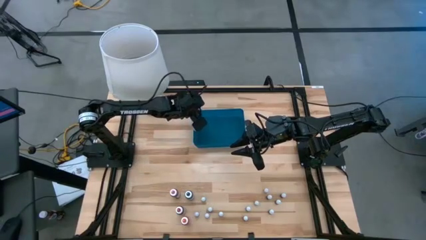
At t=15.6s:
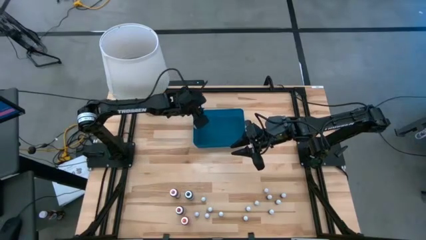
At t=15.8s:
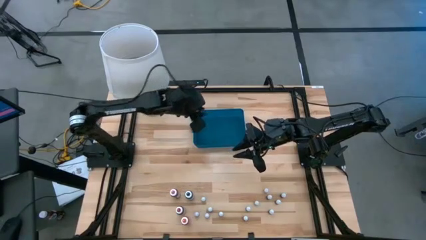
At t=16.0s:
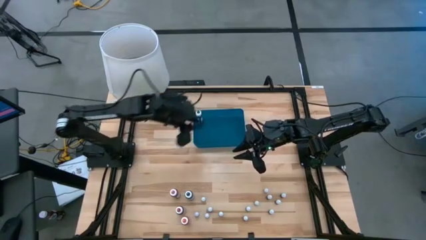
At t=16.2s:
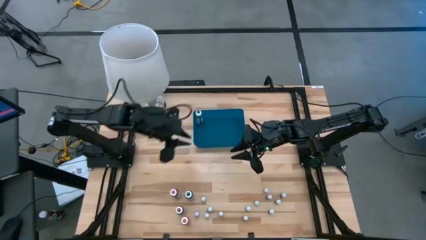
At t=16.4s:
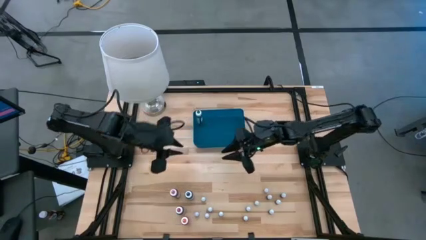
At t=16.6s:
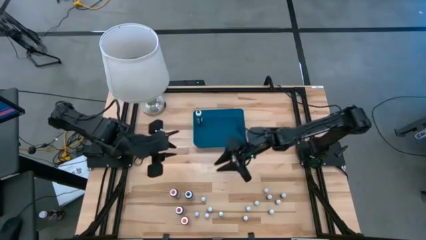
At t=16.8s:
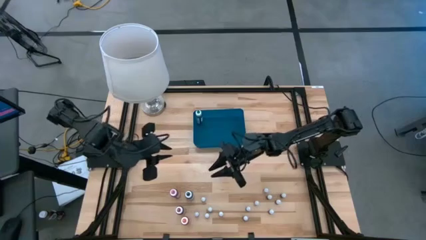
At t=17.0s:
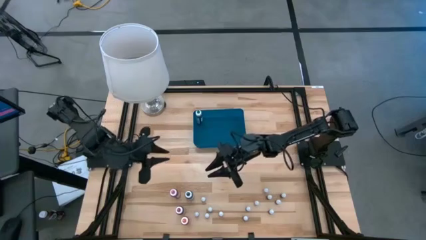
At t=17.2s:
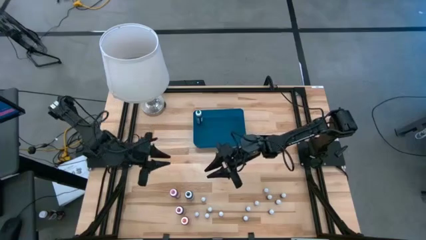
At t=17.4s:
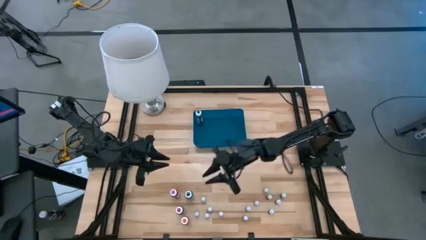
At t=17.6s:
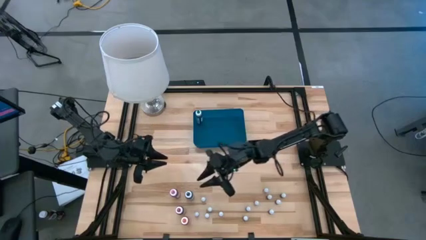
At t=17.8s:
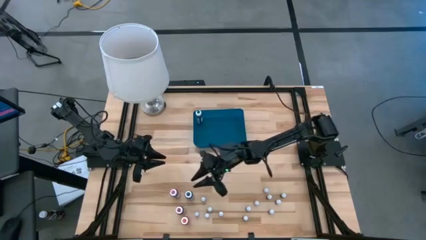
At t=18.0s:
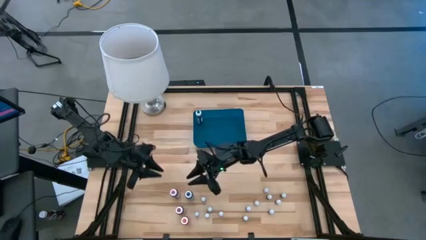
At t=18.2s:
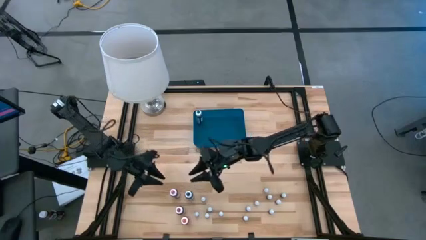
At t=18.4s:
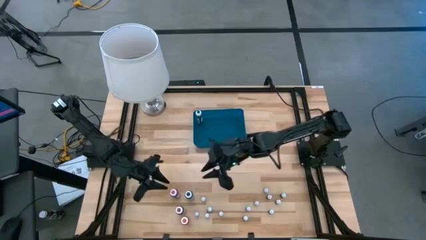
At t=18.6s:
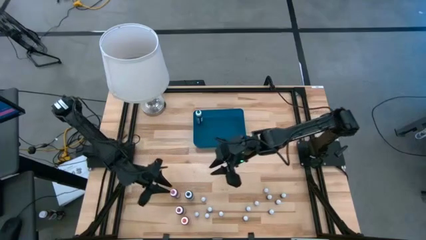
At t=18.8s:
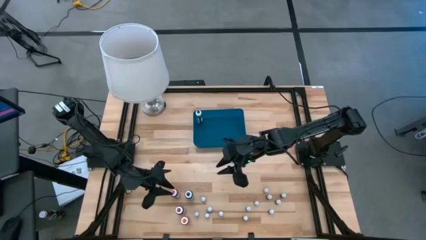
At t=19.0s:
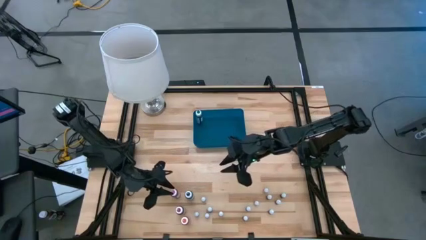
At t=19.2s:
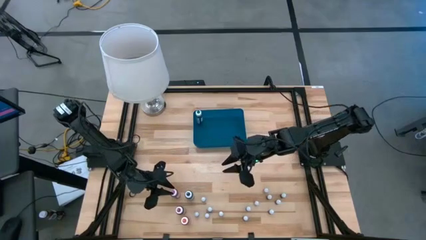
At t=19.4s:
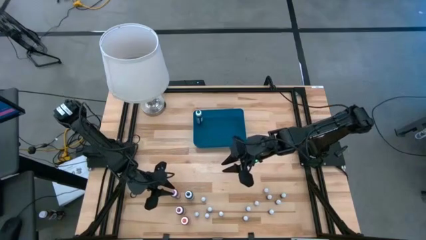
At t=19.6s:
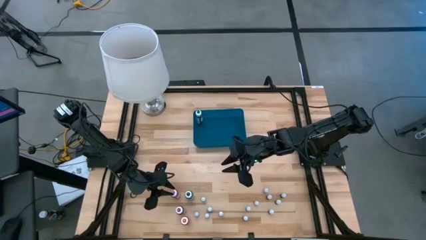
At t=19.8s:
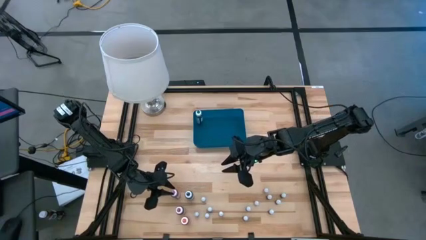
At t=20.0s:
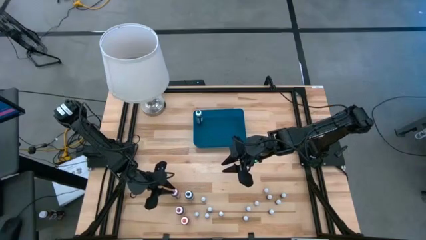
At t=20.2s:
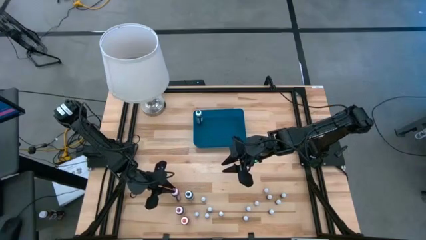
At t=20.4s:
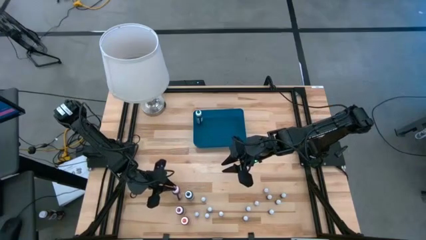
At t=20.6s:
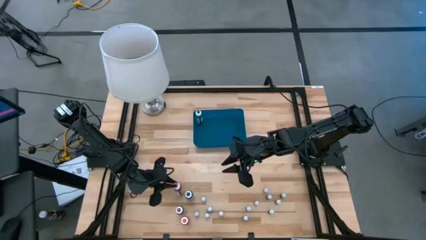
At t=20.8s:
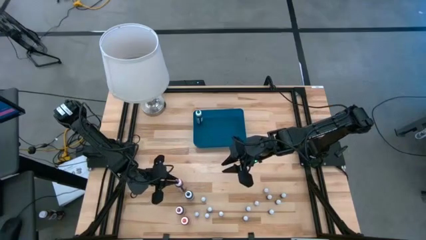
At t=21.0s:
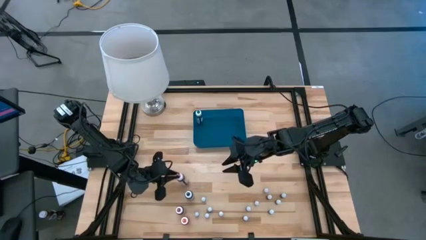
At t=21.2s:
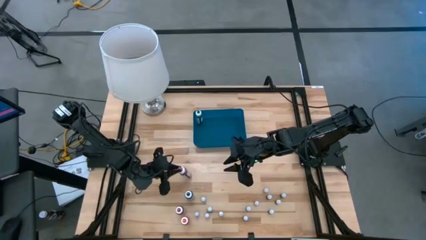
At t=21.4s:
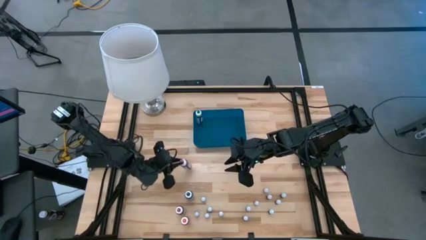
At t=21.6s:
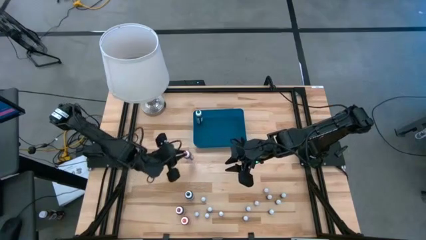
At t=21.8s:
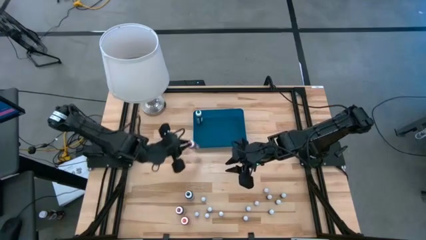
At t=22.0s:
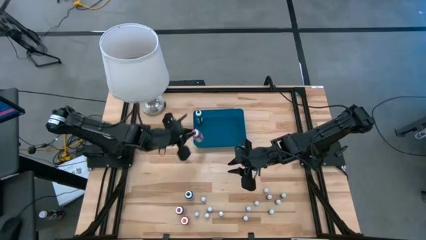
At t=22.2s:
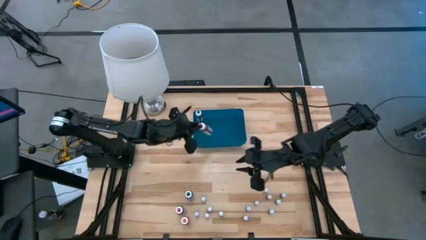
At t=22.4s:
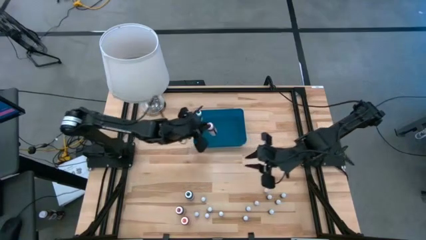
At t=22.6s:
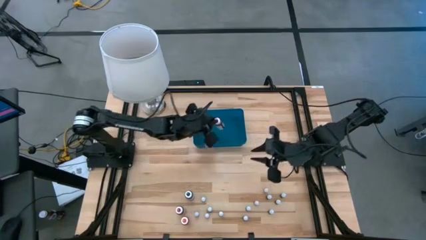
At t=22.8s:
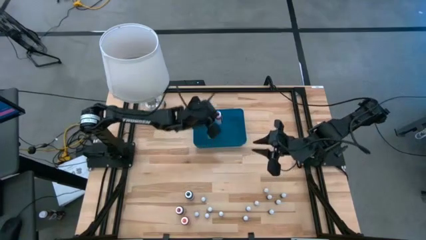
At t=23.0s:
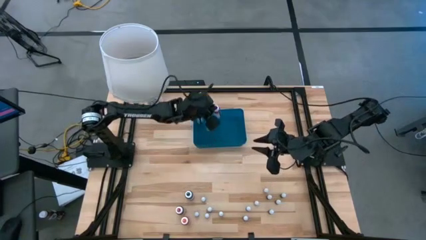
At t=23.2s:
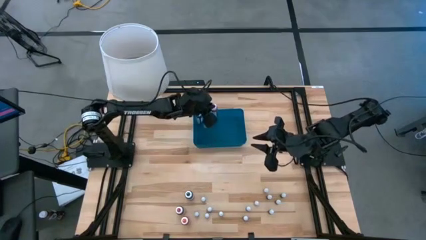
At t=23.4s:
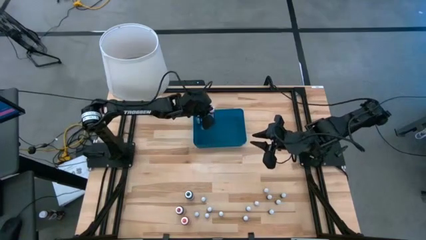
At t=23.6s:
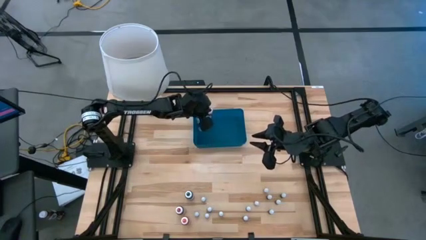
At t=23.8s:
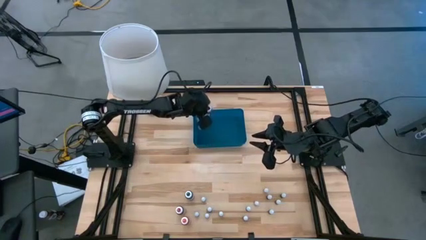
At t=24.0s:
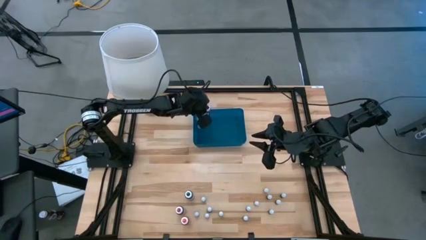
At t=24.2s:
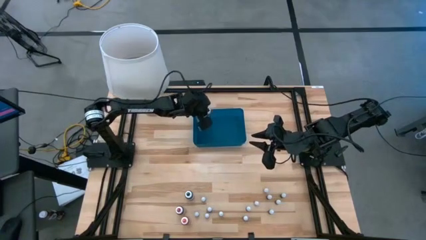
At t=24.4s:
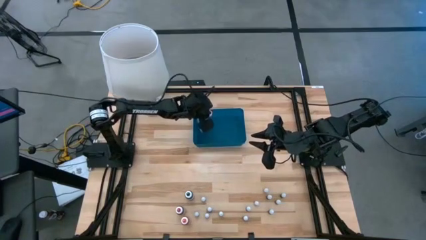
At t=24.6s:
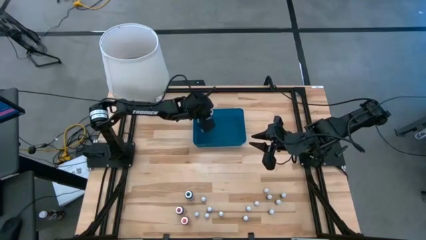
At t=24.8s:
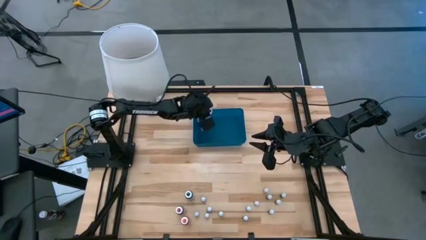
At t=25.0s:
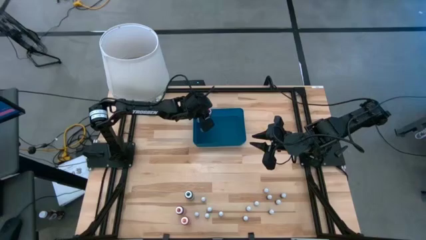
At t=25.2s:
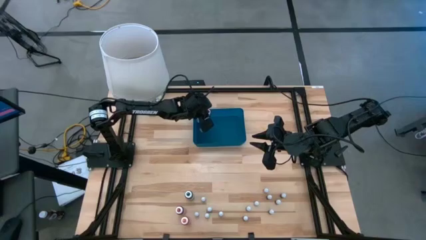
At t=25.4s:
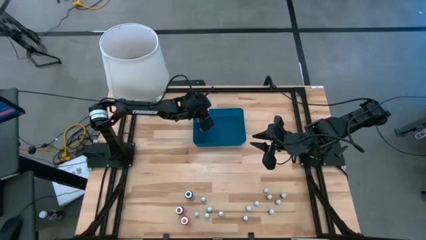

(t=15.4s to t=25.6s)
Task: Pick & Place food coloring
Put the large pink food coloring bottle into the bin

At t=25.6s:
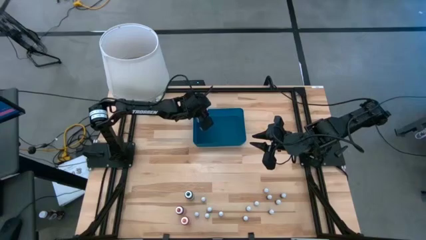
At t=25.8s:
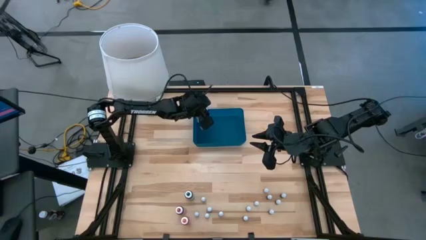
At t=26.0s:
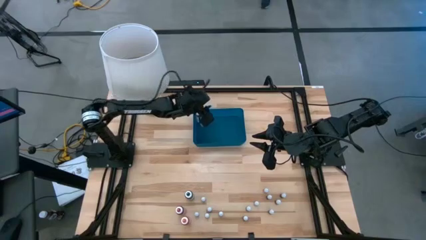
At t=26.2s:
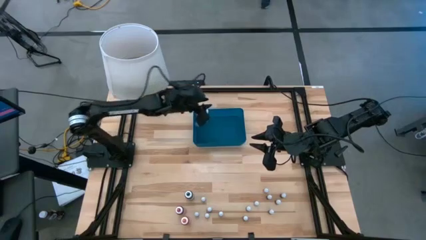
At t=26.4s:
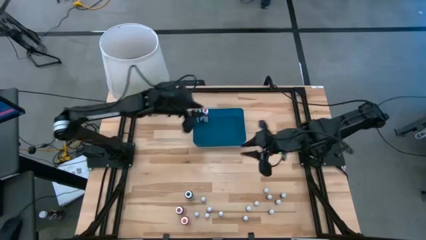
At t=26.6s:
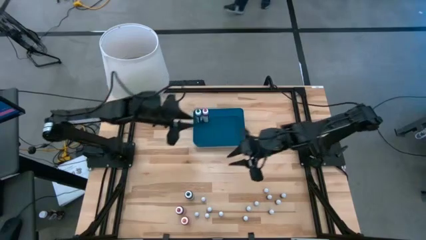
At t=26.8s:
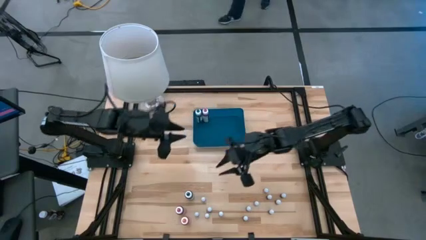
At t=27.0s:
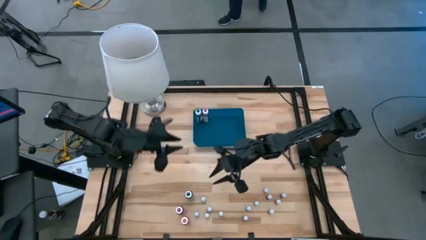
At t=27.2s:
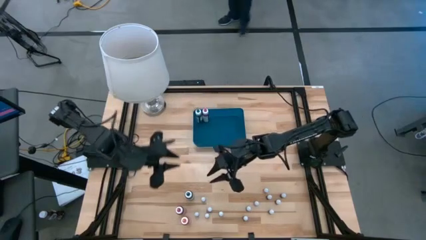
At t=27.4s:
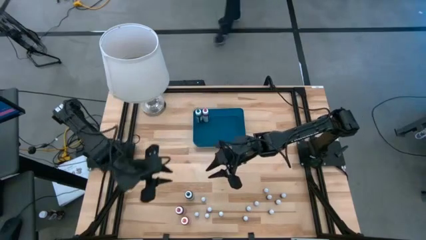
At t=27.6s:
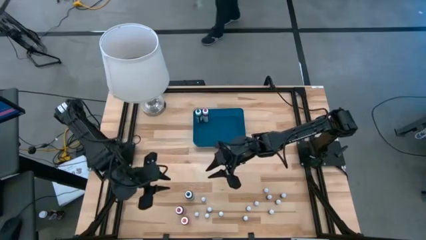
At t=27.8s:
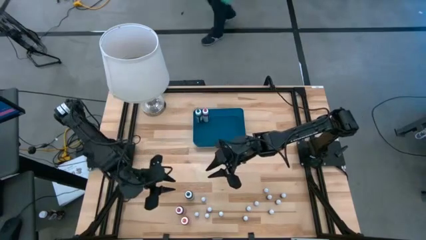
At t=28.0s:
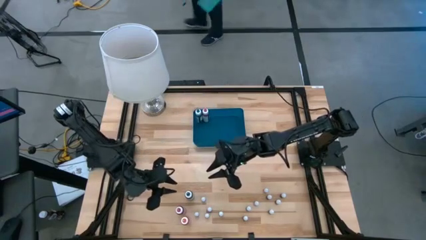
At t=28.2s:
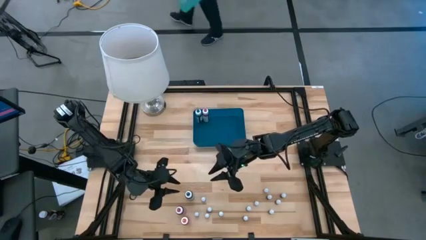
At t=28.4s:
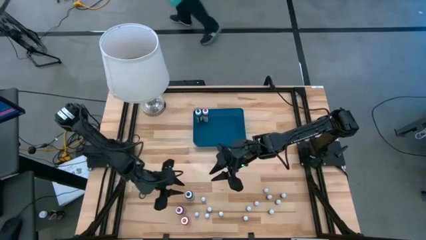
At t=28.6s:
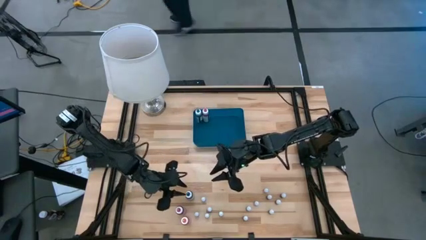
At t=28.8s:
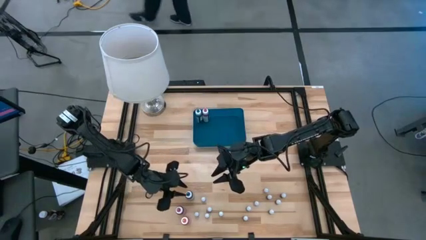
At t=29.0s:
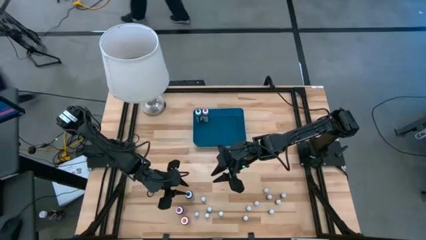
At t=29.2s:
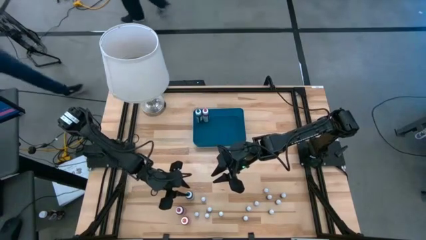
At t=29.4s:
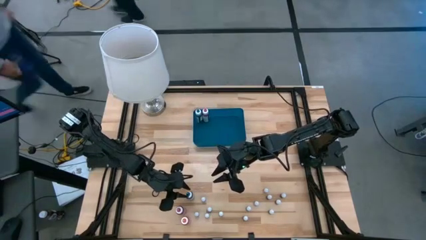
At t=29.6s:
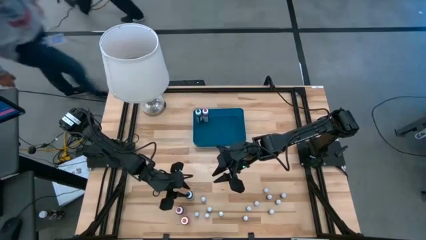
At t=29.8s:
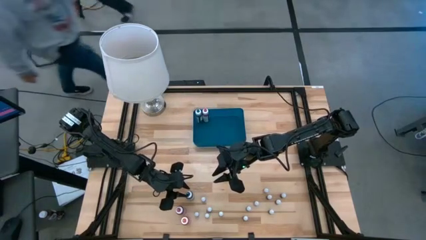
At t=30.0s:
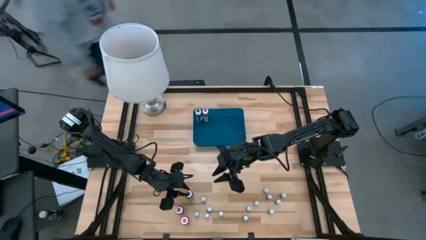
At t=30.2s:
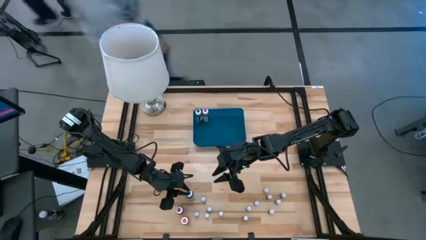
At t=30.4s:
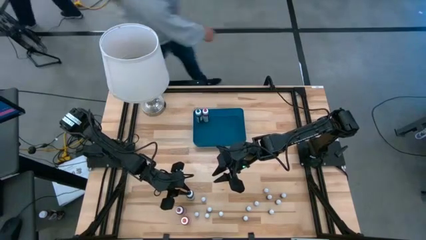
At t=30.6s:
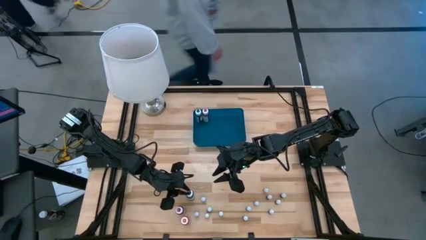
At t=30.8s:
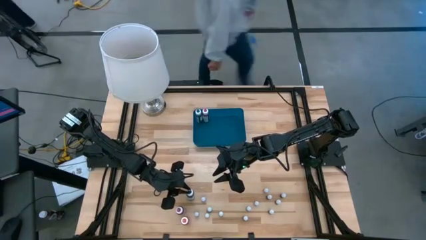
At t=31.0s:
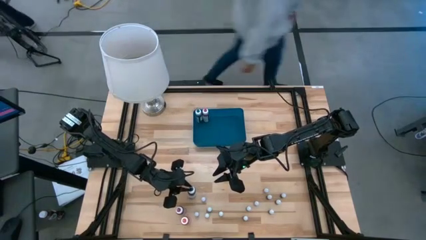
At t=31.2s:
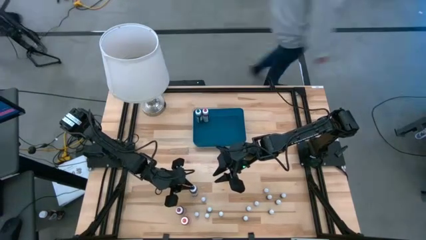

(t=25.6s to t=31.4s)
Put the large black food coloring bottle into the bin
